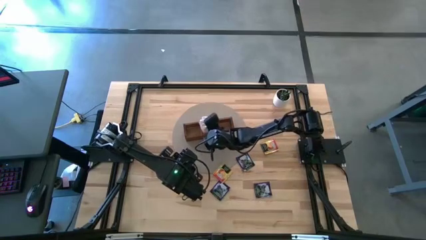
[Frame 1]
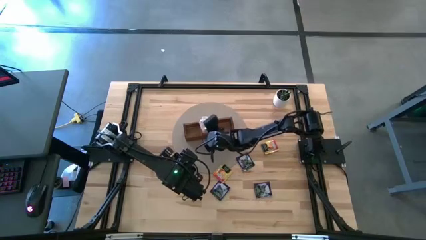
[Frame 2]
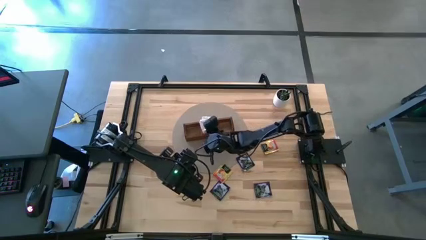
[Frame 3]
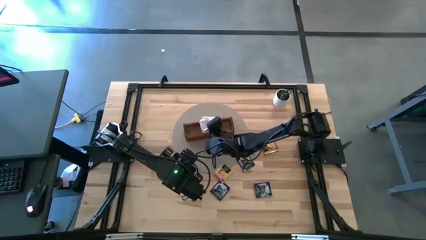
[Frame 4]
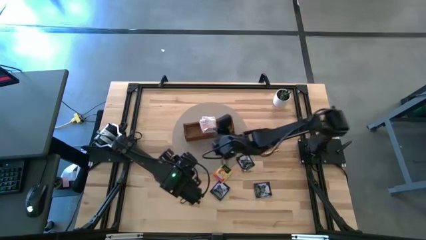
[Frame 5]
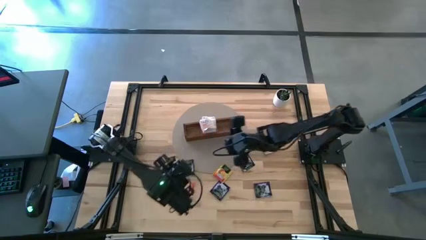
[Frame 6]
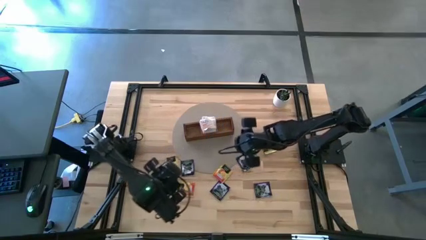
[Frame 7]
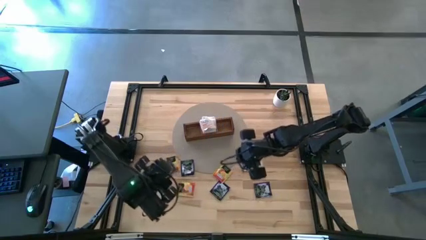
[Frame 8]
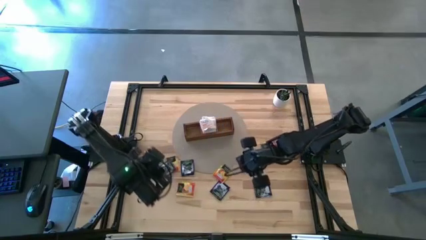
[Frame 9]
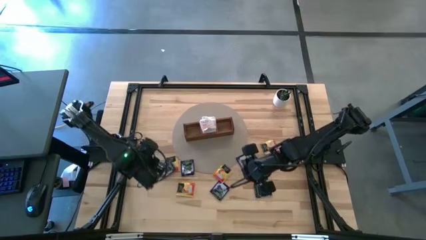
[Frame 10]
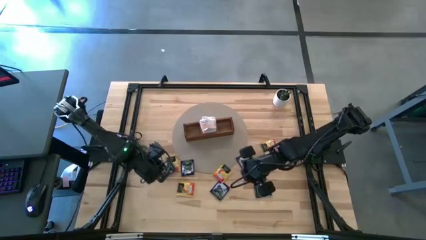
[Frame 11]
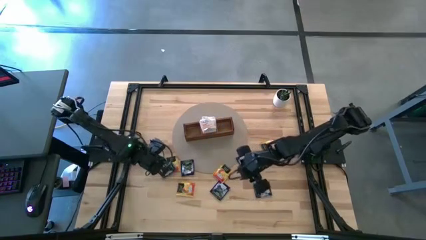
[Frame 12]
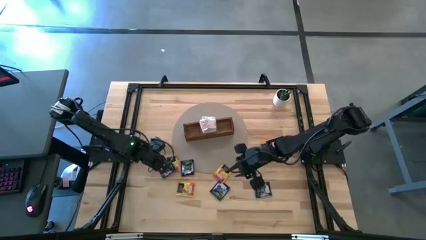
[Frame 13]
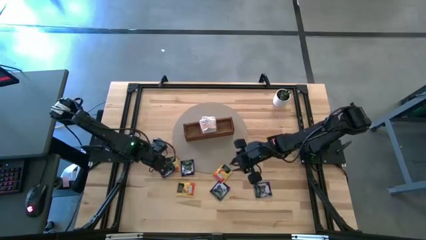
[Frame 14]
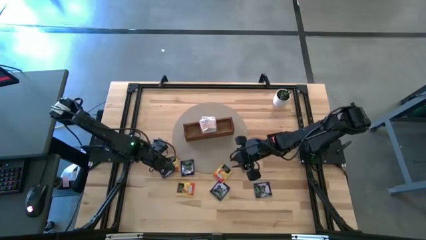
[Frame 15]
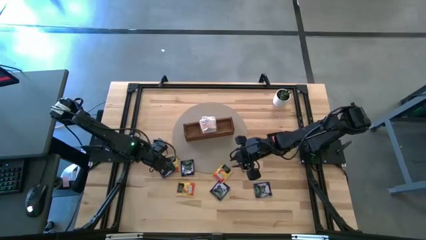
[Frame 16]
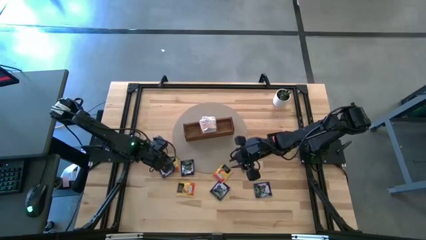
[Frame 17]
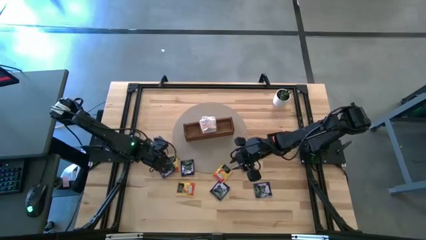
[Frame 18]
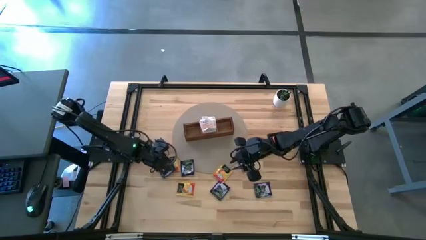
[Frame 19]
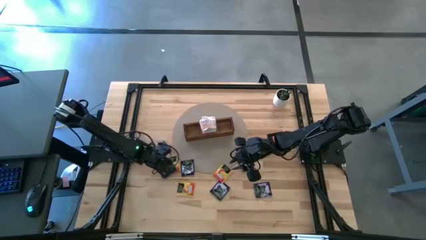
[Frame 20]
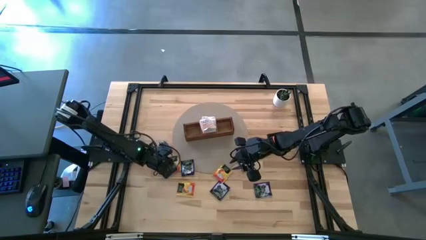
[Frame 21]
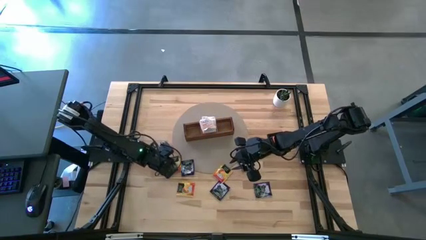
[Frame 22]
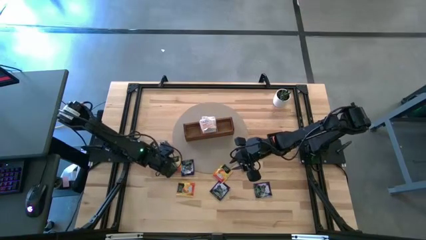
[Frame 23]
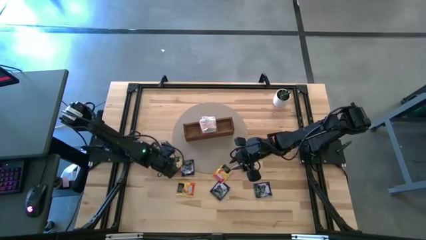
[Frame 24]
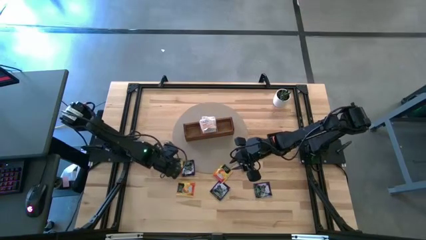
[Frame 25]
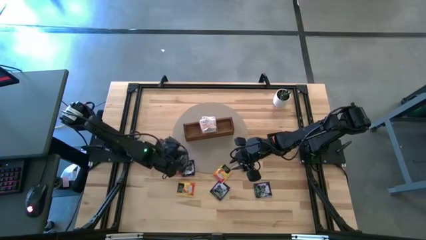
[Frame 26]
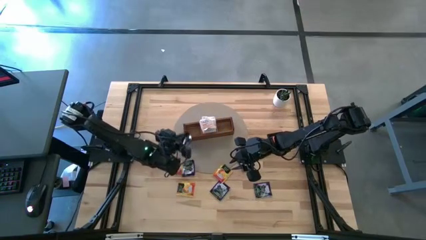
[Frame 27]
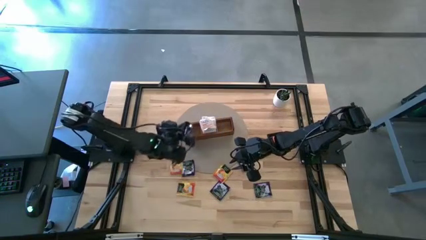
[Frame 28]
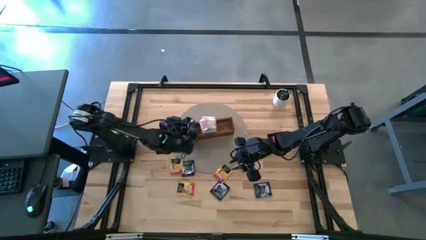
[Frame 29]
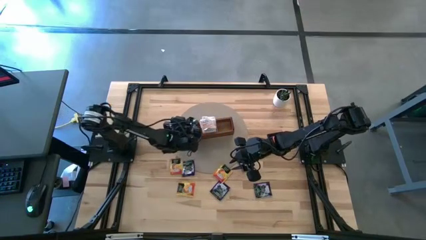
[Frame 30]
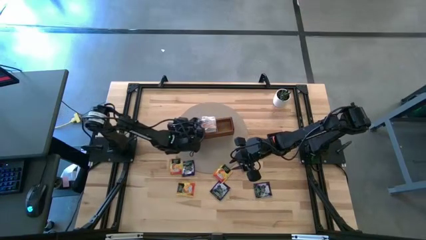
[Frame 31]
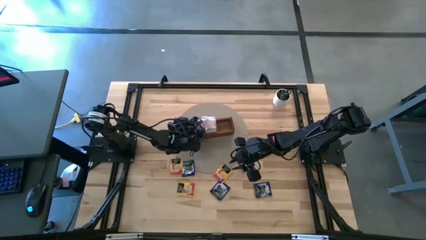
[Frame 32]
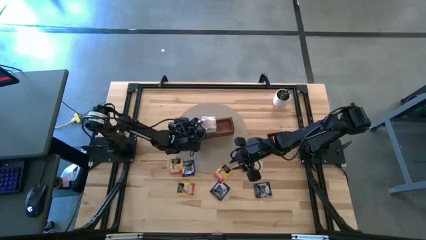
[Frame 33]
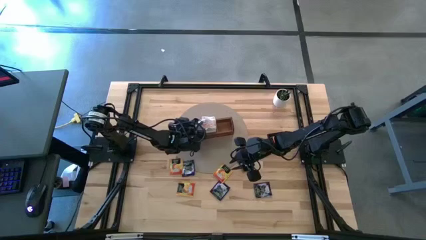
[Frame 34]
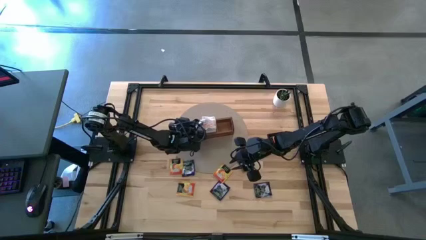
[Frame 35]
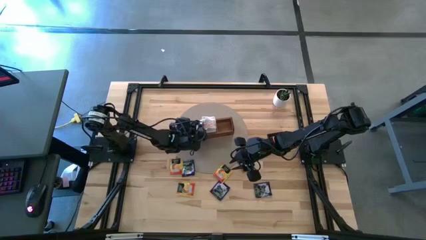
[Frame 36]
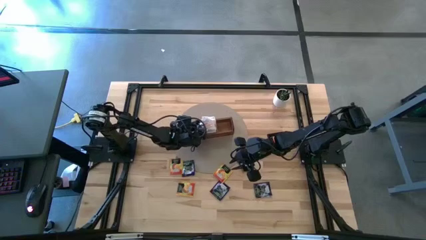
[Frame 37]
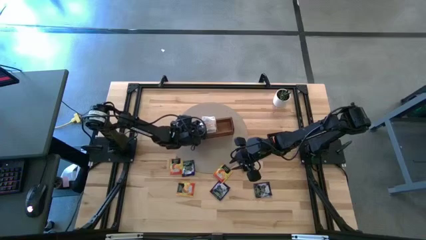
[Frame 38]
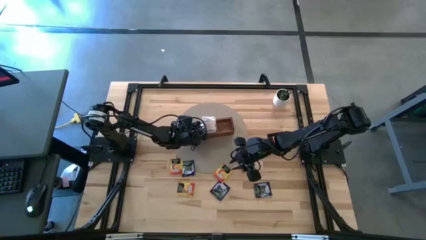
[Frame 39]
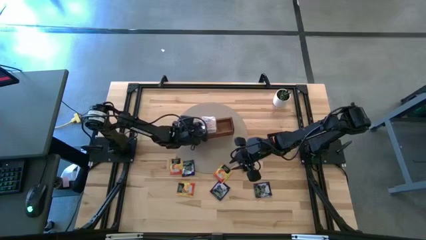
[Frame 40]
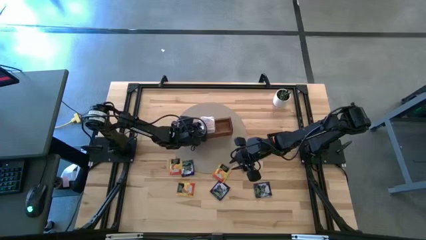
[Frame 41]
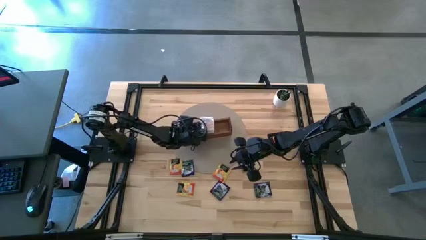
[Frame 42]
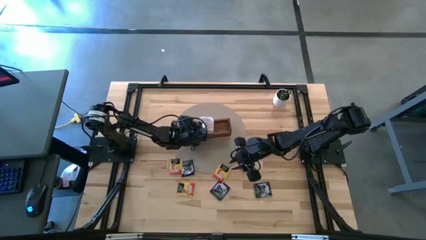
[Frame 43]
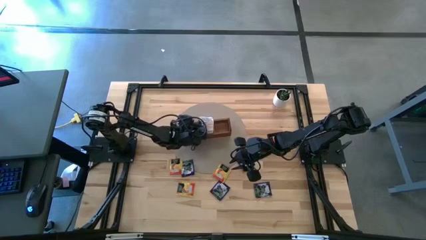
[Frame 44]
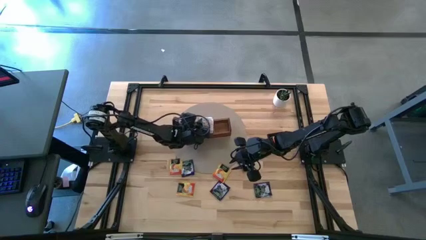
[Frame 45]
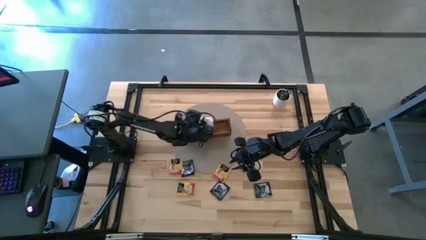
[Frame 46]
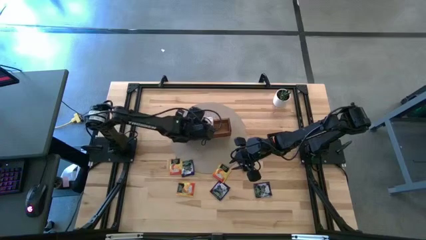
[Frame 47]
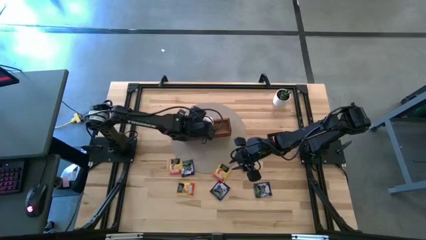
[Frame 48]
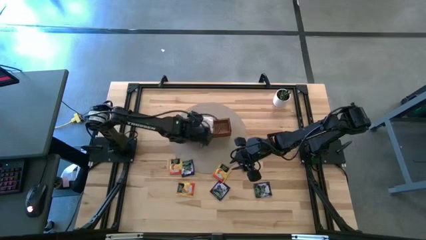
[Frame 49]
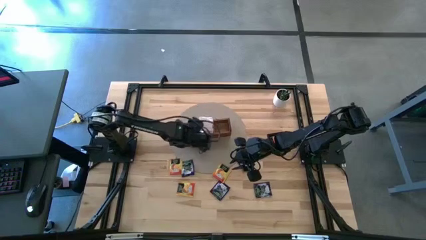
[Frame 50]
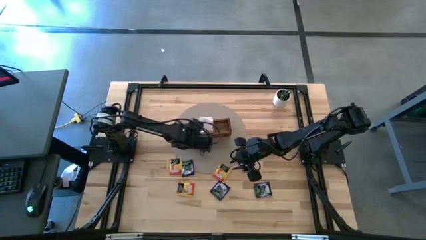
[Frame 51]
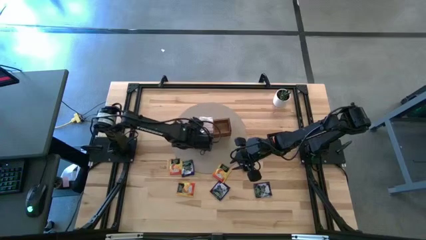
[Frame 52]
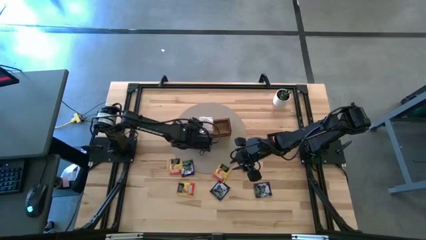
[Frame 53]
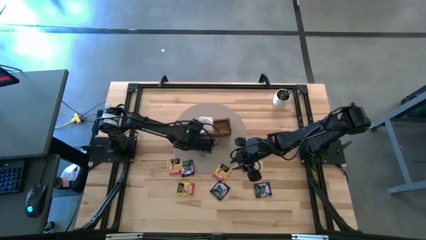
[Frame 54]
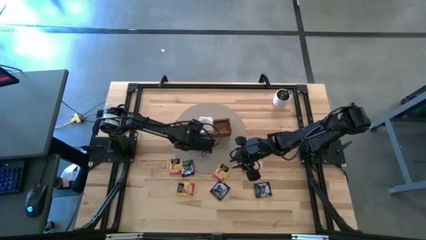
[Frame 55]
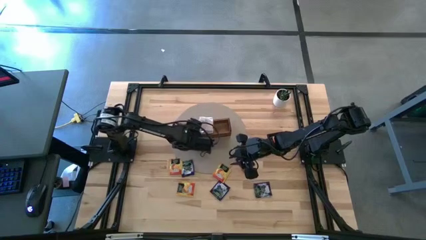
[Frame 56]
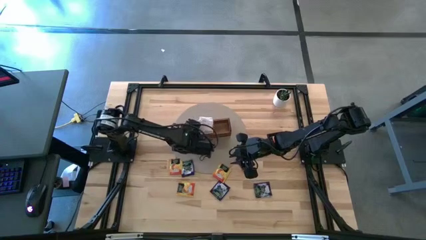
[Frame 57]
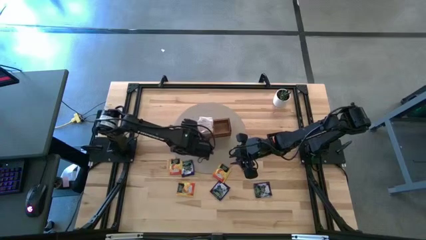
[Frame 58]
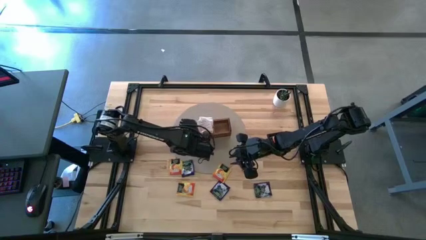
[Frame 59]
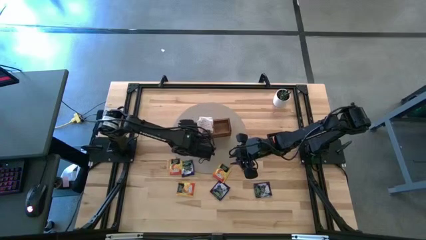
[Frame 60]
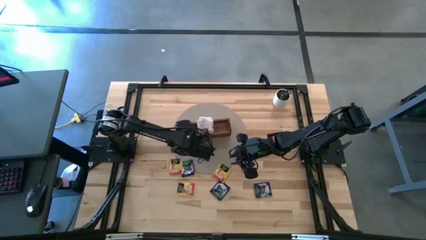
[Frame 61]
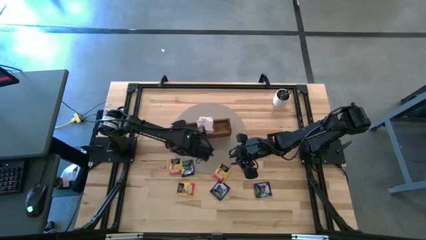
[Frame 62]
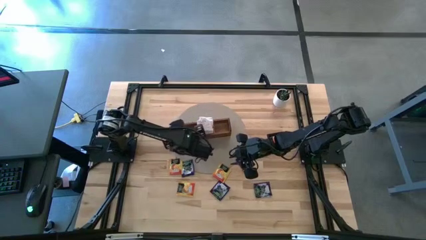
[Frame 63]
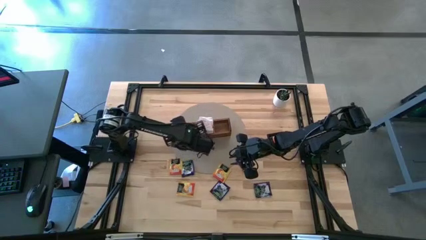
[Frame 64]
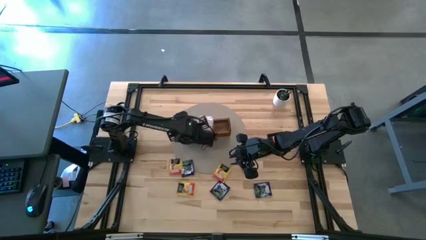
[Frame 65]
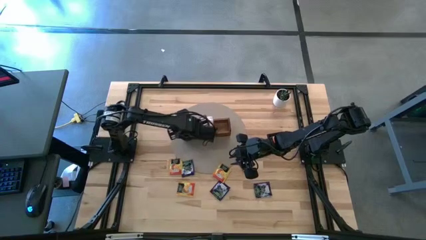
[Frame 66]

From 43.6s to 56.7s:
Task: Pick & Place Tea
Put the purple tea bag into the left section of the wooden organizer
